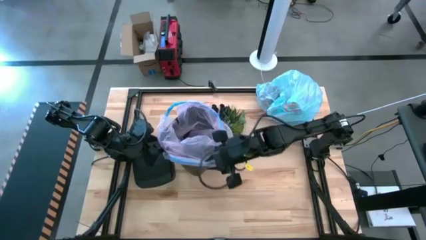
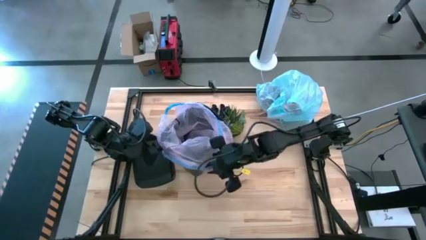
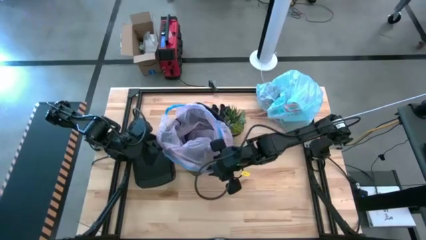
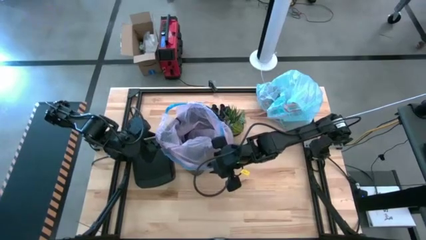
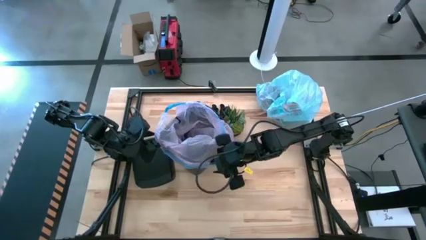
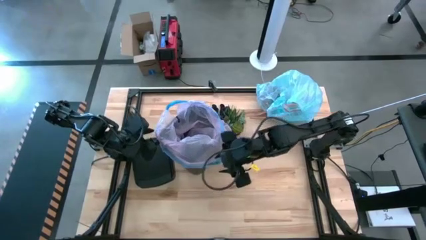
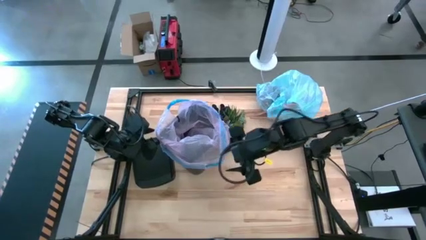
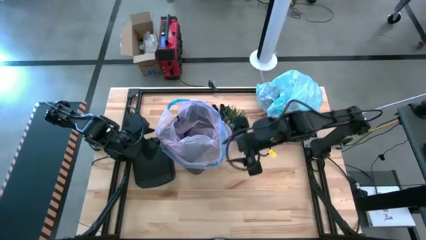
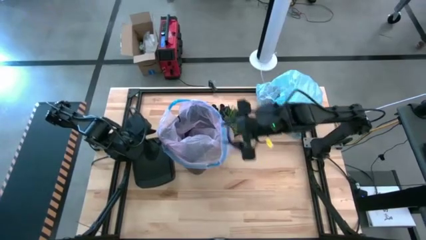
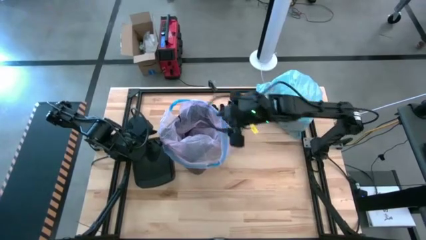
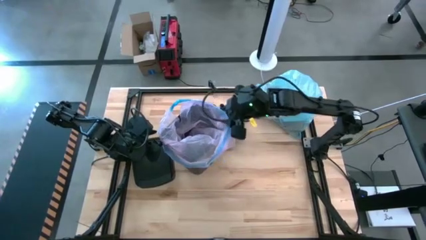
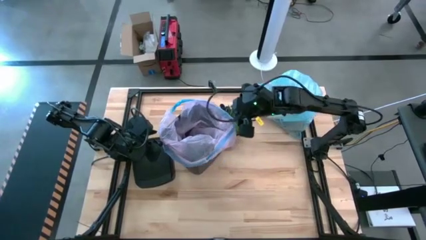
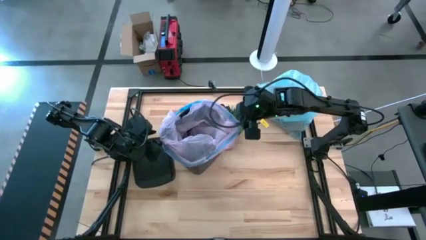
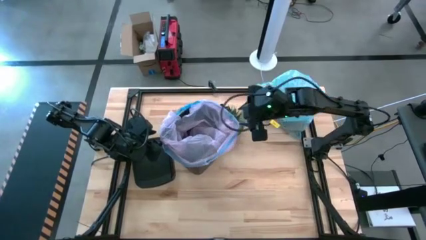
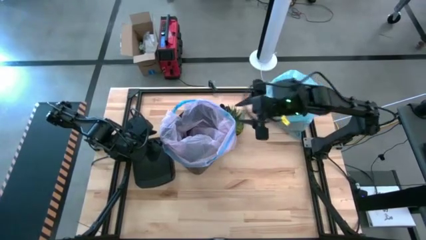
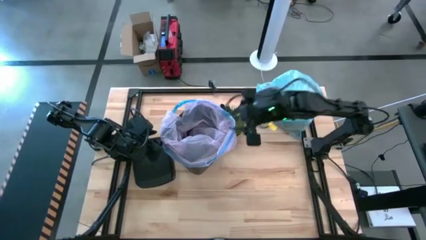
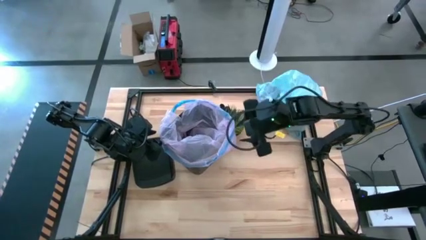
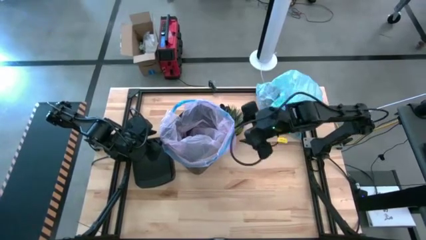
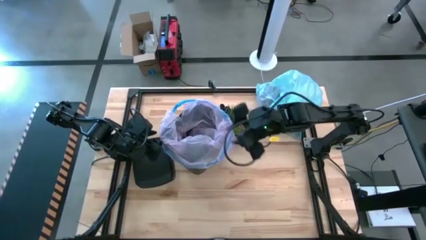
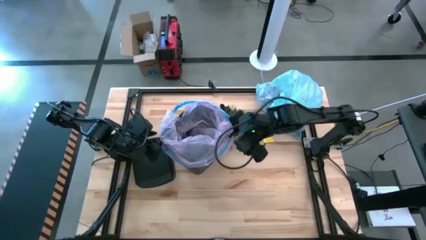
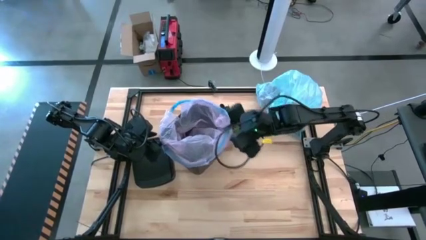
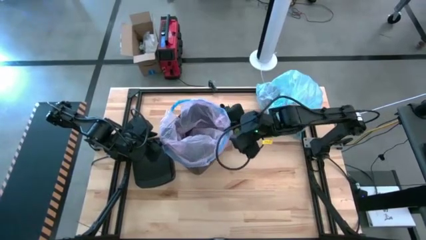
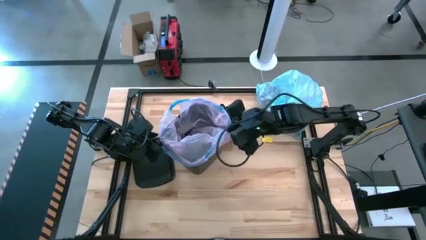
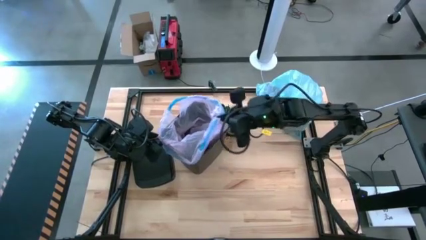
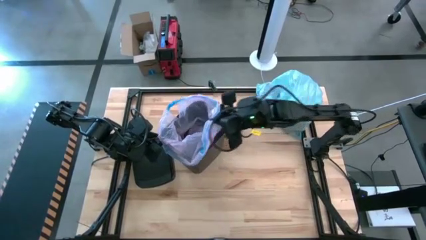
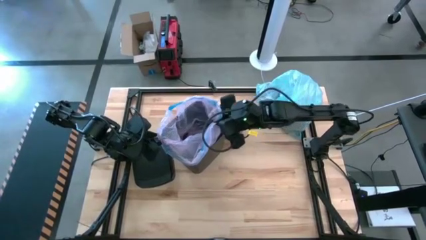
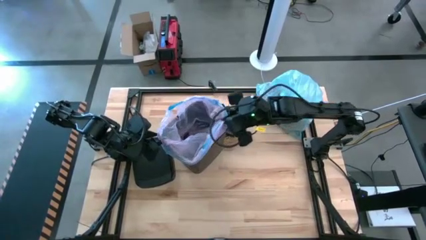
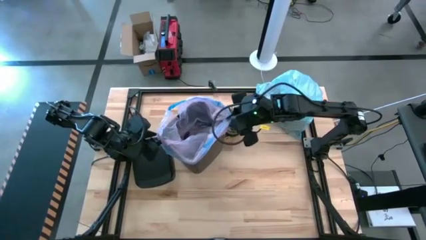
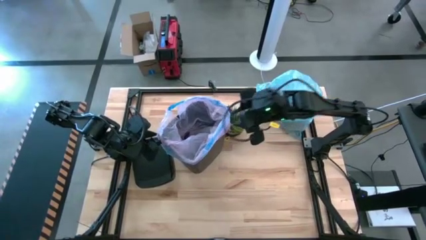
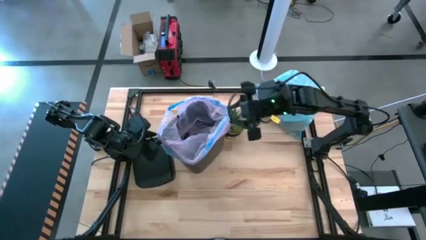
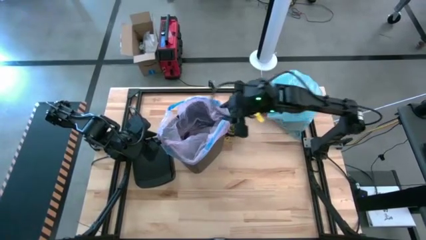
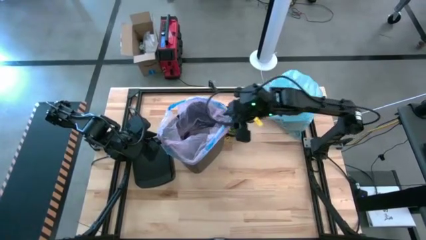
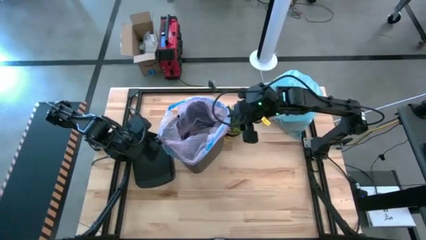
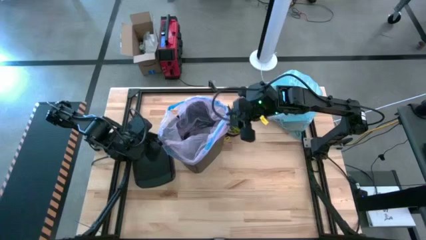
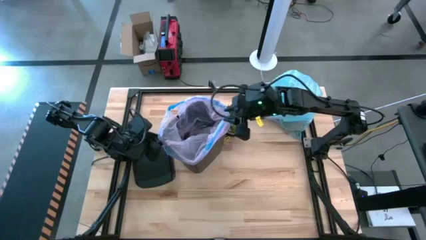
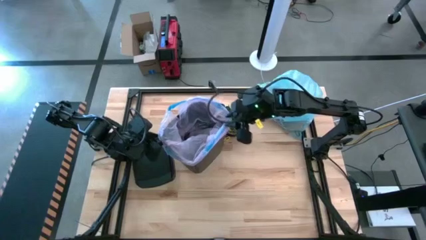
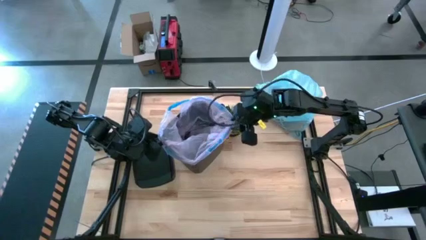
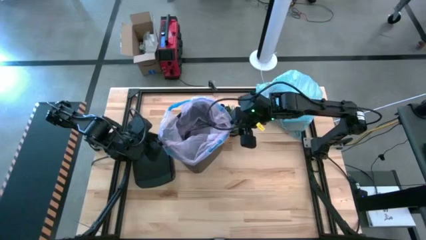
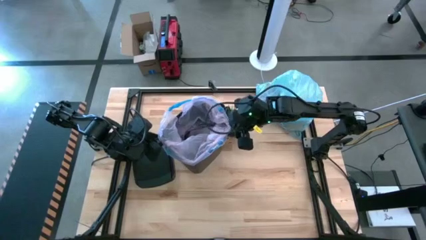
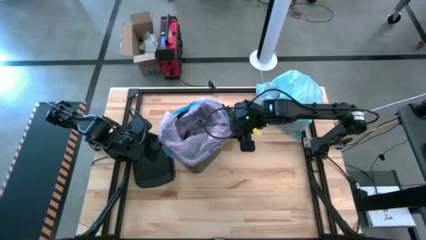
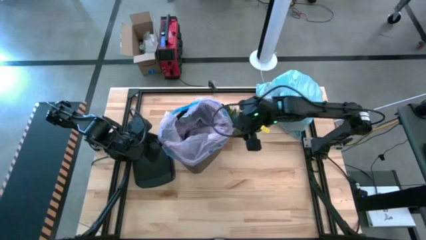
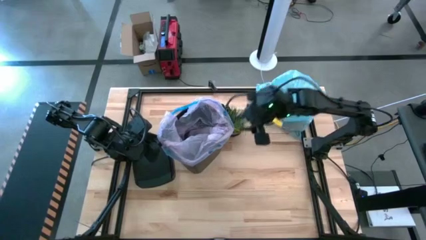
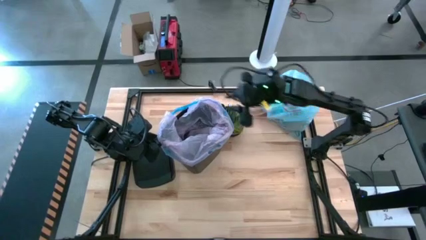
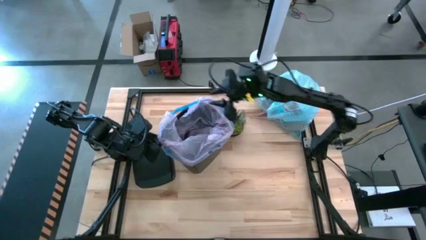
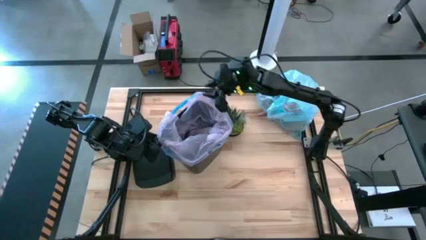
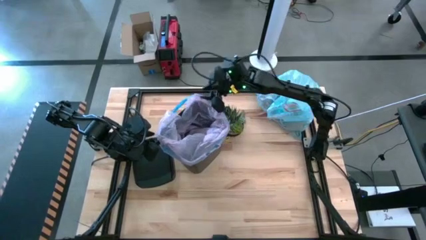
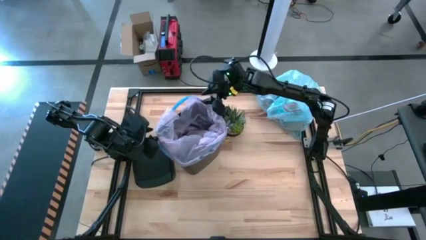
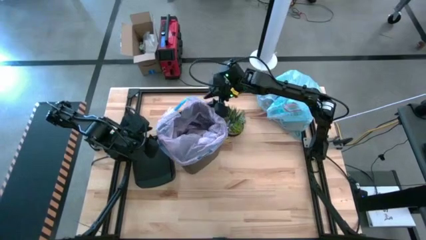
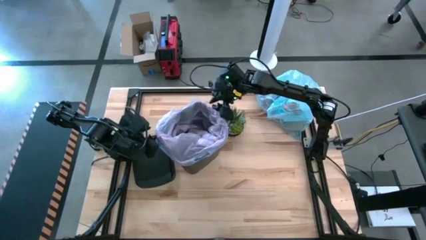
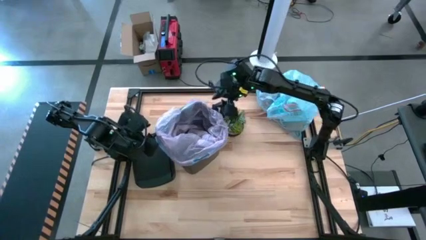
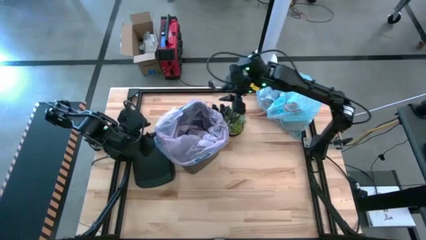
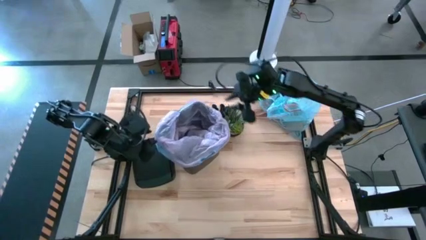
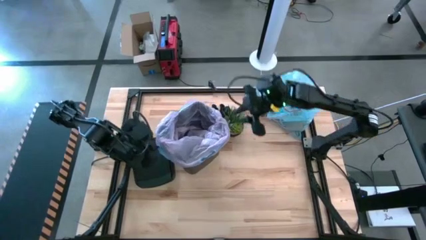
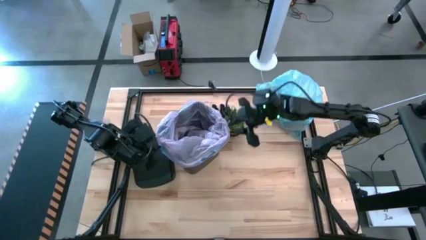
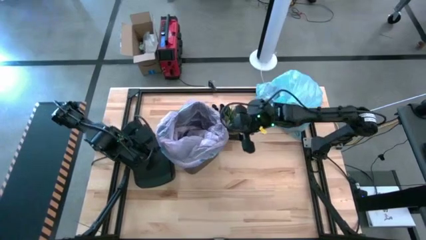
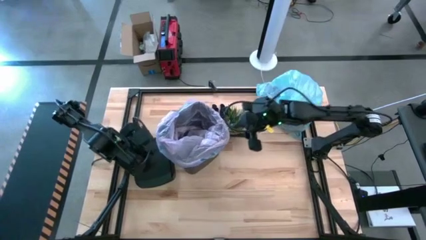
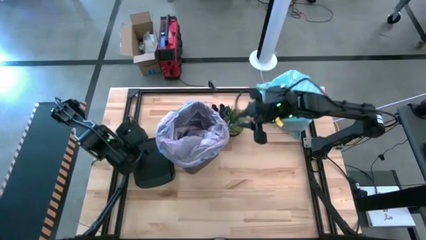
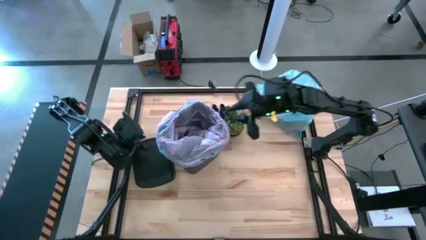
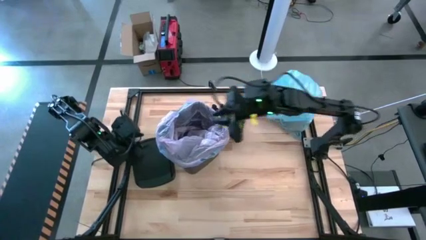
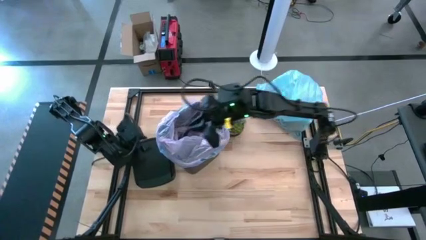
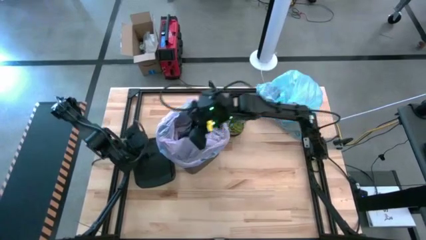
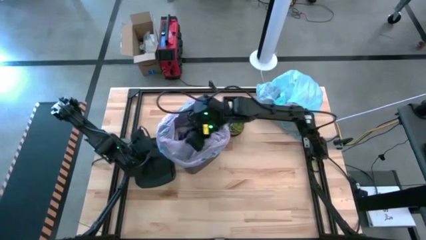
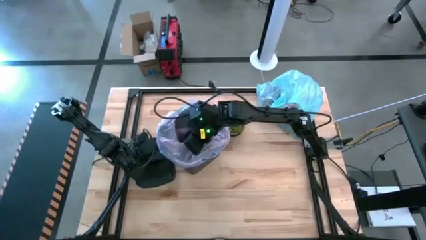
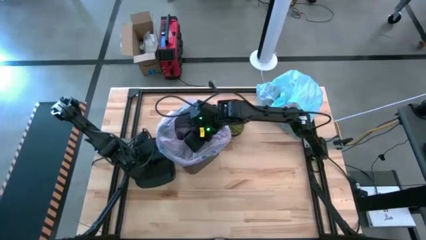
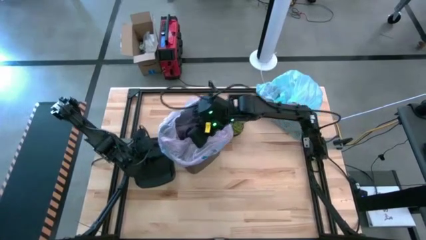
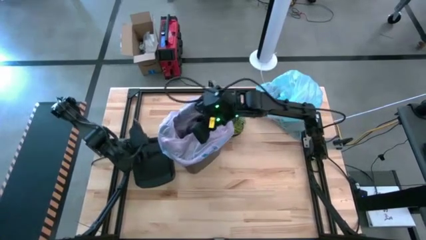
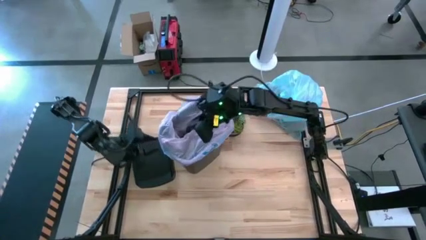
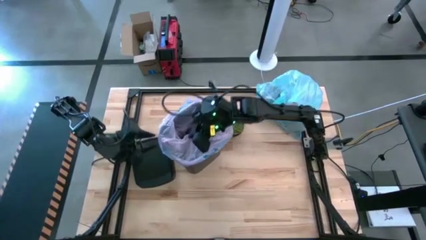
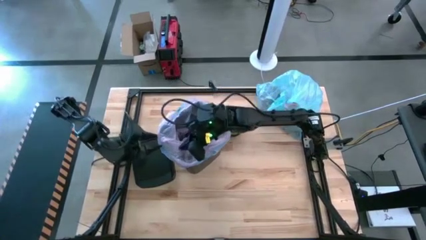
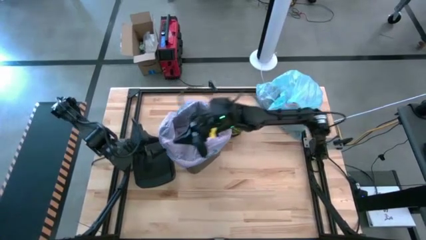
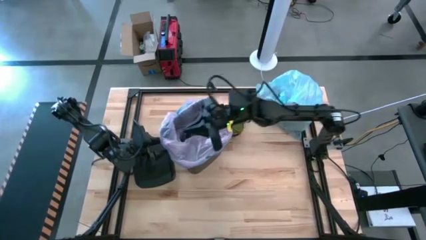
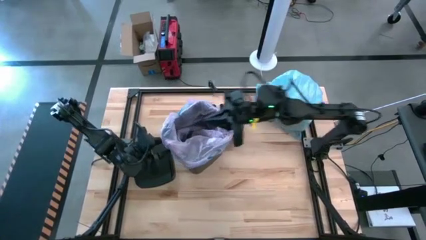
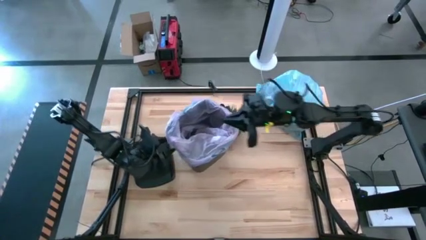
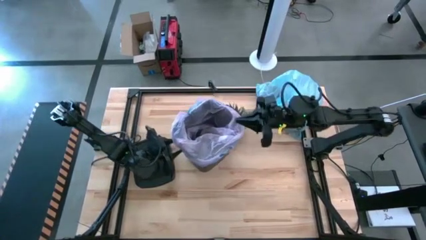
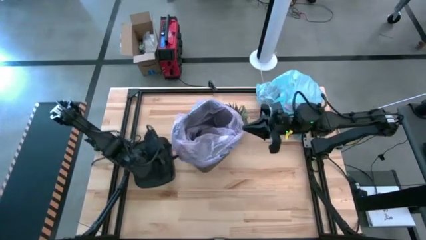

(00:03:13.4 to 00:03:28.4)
Task: place trash/remove bag and relplace
Insert a new pink trash bag into the trash bin
